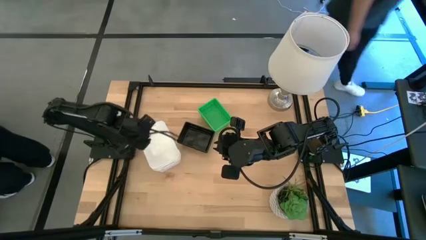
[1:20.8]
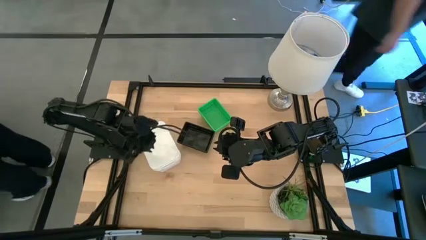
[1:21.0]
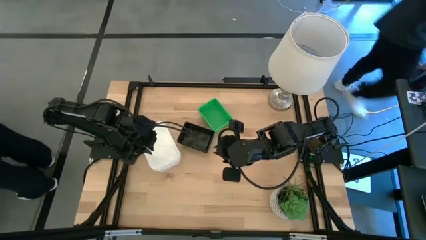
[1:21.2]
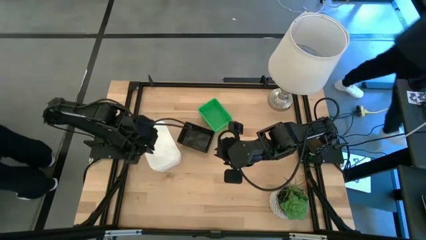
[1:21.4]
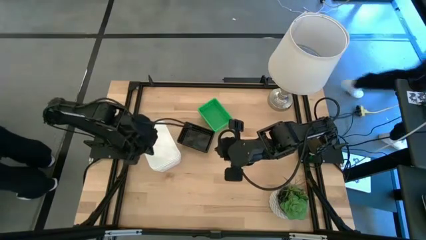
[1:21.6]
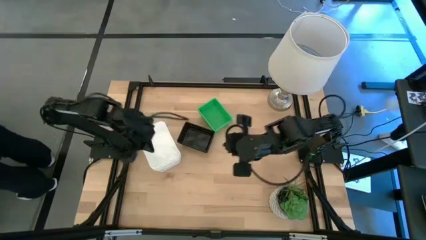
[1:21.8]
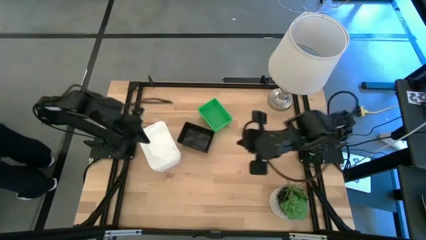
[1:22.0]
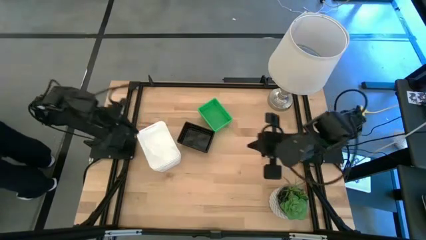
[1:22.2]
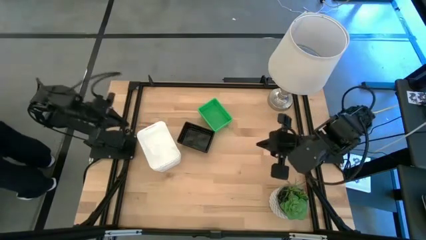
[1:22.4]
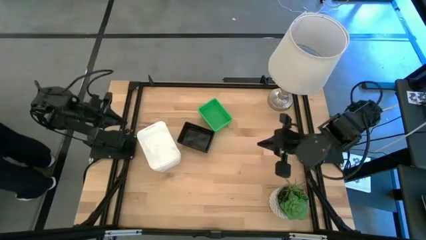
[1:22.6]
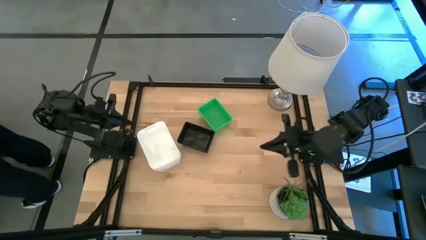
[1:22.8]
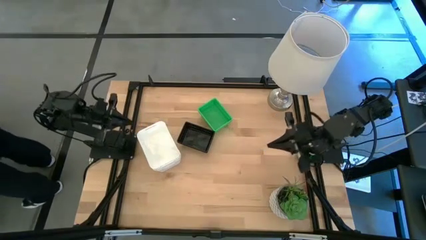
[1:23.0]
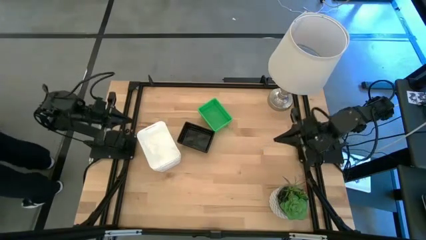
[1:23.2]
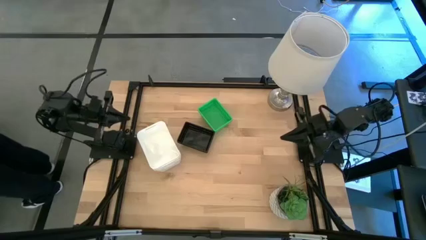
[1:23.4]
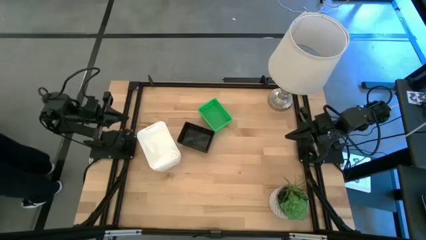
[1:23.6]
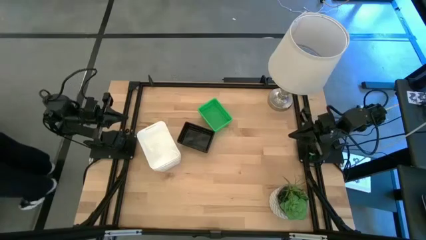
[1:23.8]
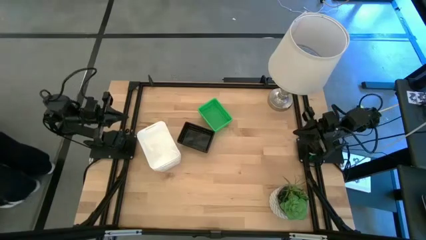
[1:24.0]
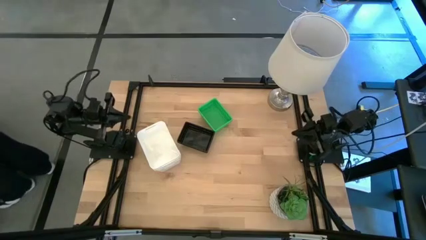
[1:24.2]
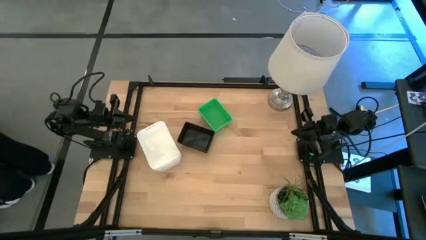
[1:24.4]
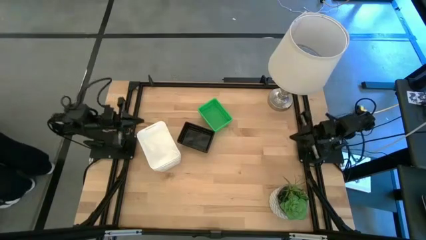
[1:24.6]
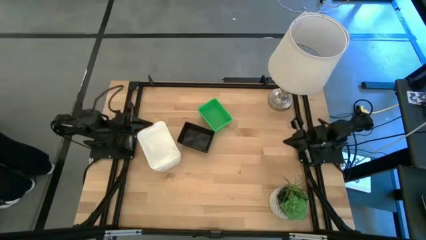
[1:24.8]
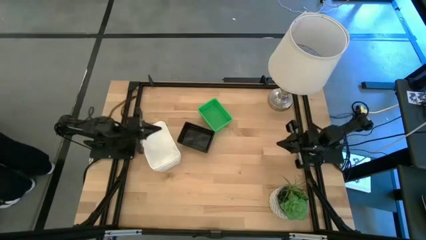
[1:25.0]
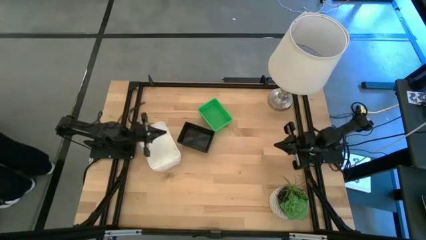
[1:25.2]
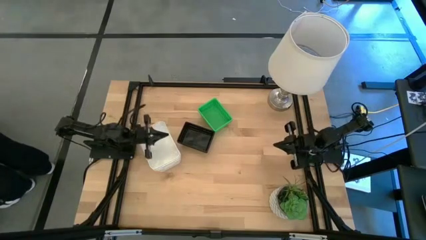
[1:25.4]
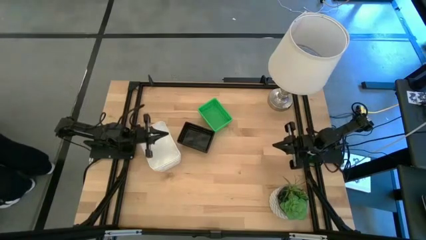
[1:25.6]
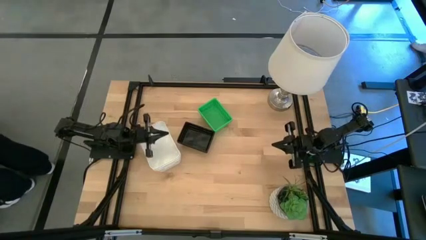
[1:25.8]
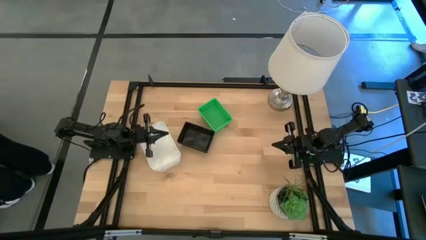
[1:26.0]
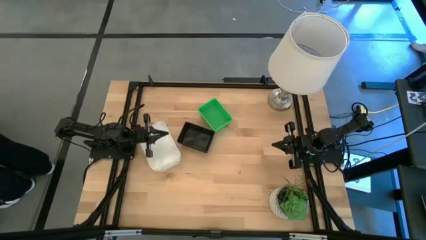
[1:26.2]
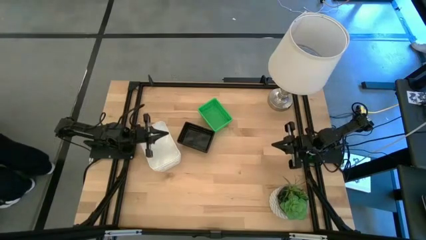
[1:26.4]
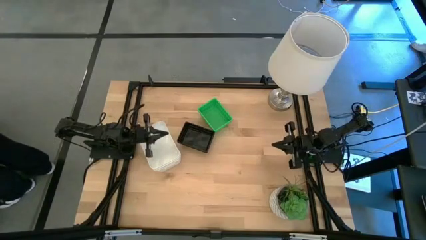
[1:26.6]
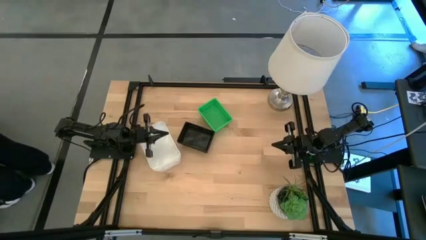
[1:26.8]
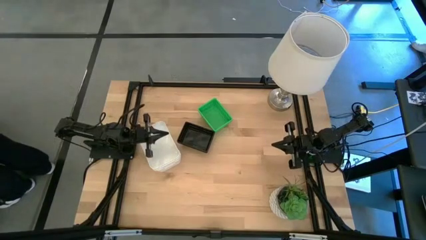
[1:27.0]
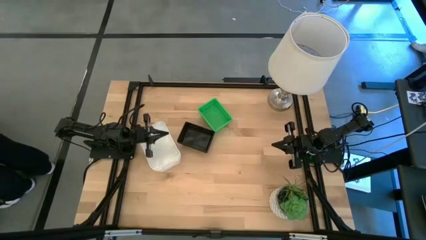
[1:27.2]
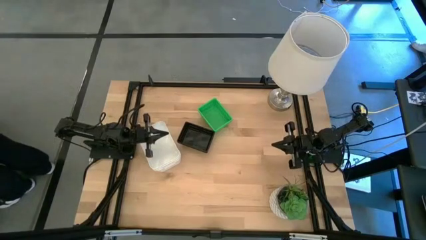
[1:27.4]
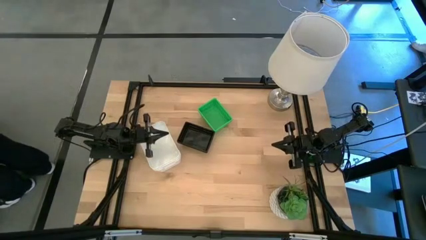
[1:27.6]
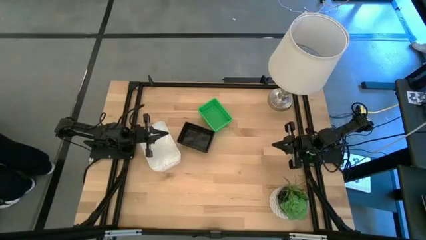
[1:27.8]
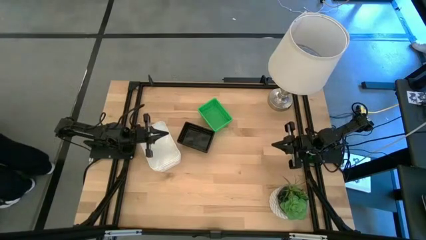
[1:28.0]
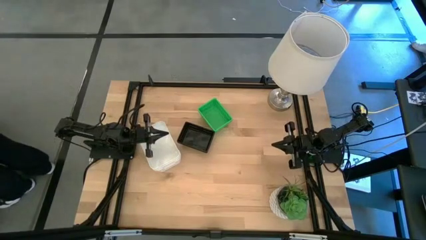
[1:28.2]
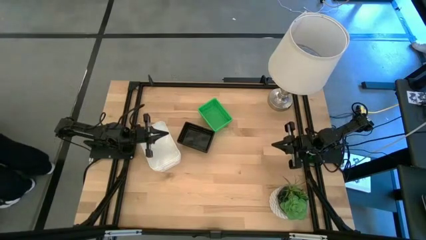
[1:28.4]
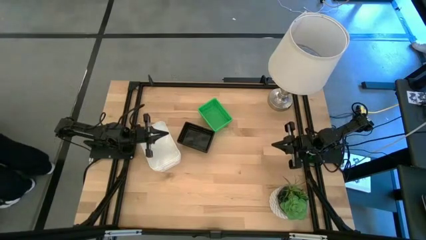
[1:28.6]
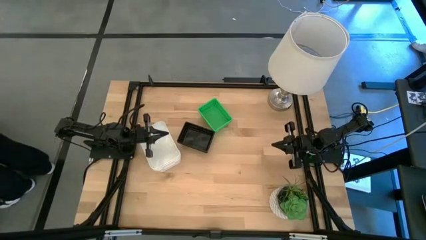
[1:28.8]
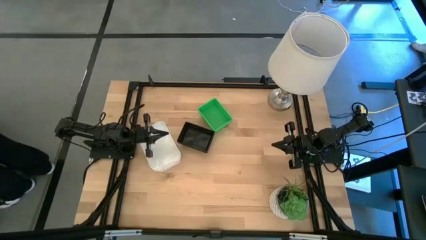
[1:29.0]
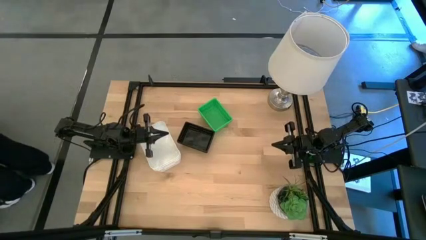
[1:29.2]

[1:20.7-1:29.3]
Return to Home Position

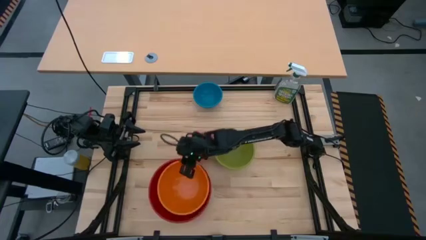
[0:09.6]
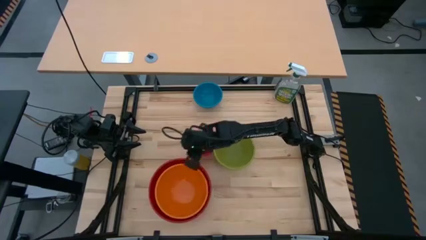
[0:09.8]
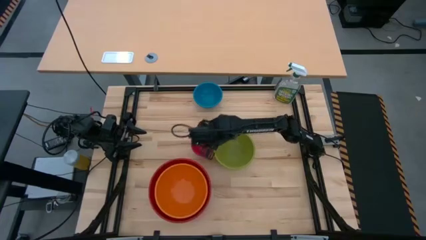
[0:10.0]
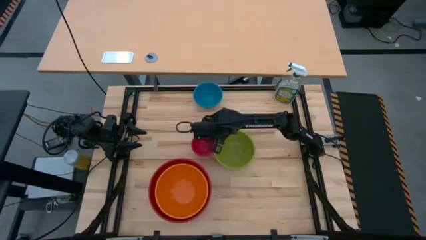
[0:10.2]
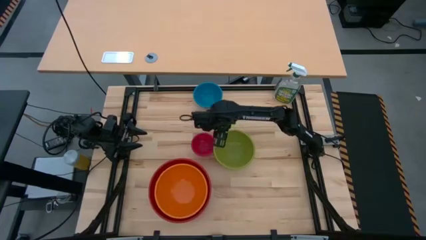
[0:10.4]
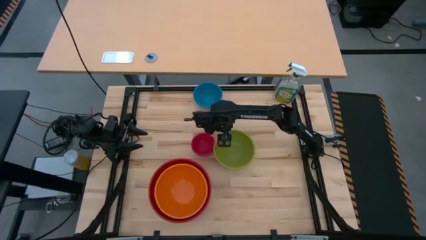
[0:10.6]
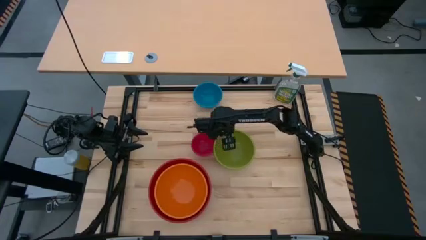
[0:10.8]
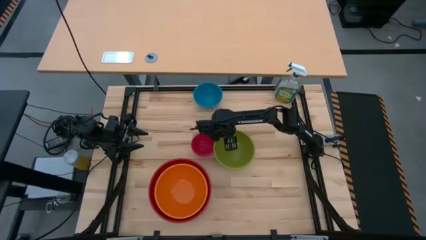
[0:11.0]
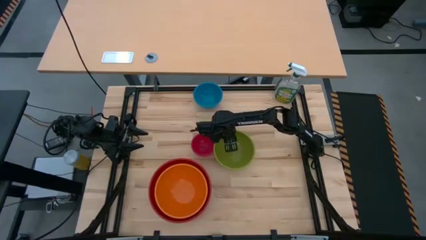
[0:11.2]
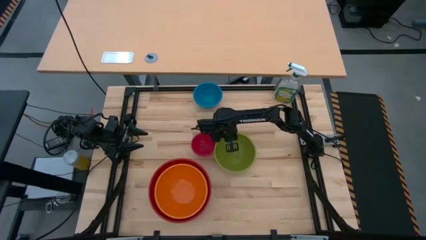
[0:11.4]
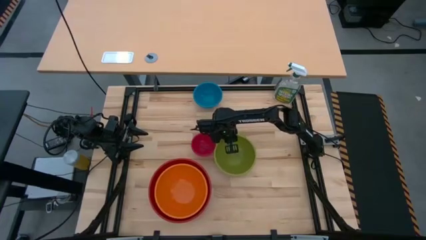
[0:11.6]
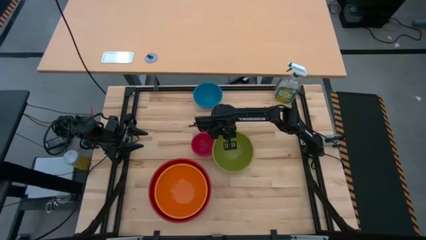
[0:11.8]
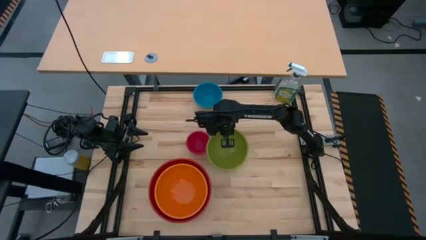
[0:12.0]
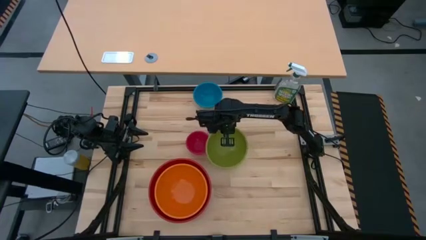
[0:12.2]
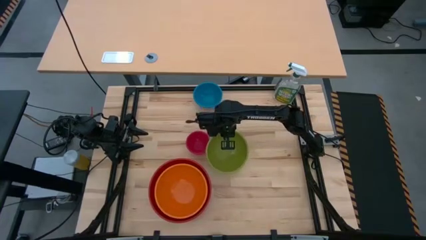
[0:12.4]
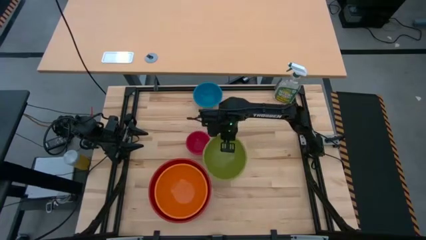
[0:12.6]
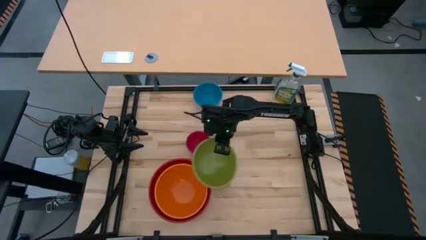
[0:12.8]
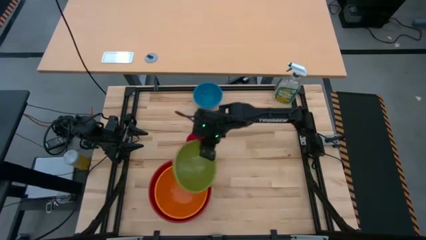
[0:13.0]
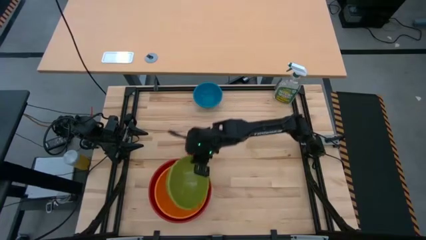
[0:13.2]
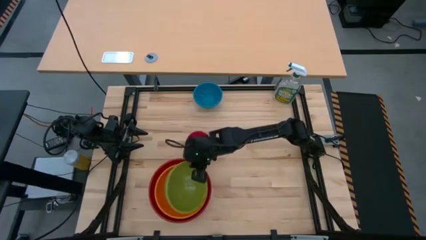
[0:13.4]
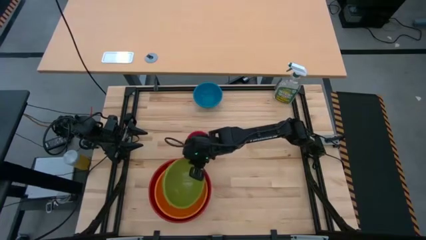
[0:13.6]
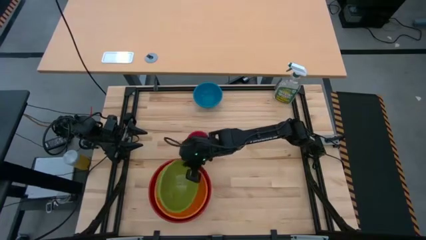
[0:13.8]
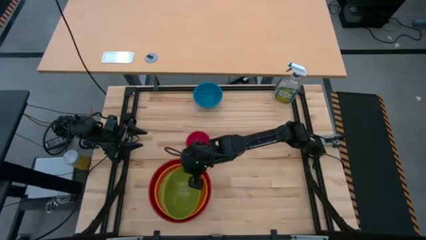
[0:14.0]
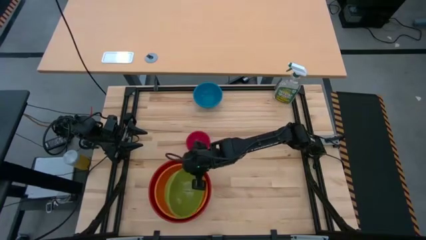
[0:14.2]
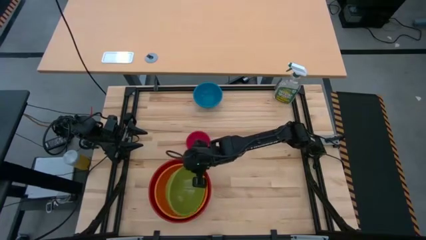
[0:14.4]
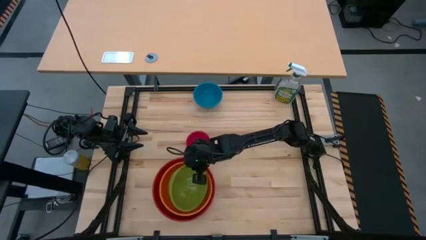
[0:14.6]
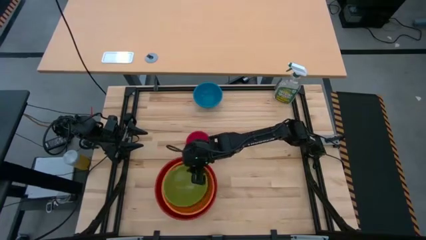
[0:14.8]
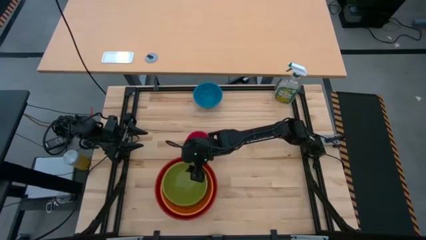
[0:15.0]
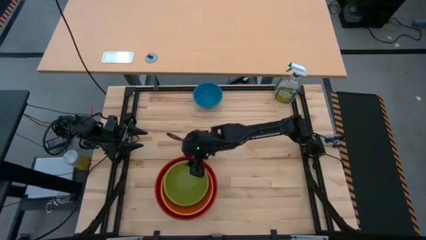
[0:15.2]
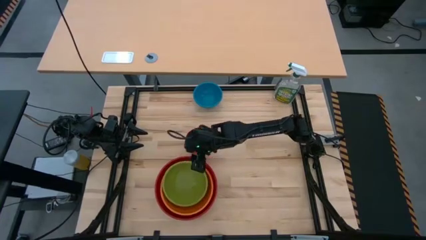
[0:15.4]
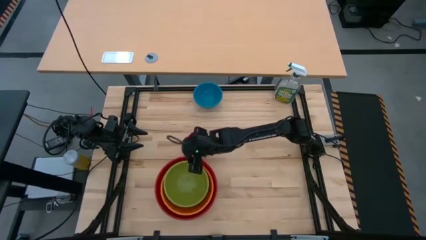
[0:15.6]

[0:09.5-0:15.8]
Stack the green bowl onto the orange bowl
